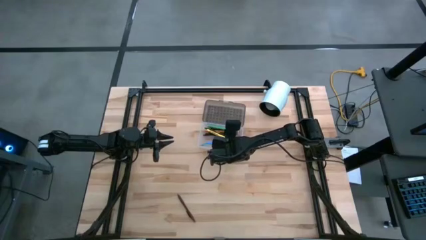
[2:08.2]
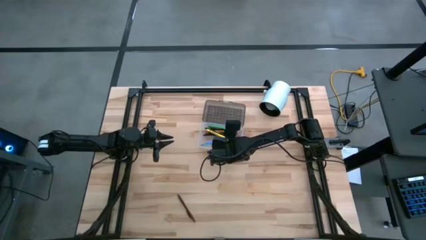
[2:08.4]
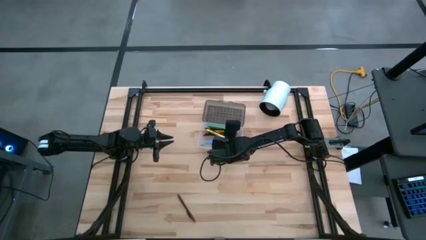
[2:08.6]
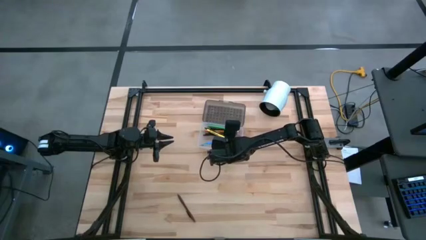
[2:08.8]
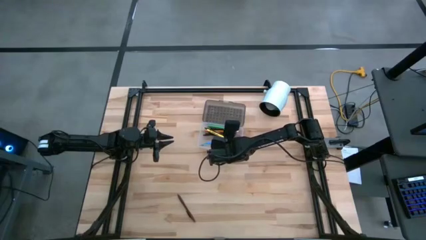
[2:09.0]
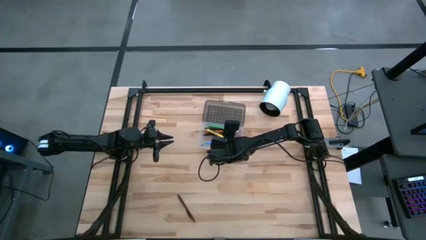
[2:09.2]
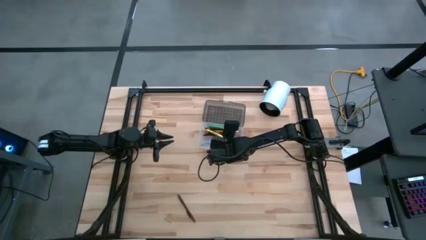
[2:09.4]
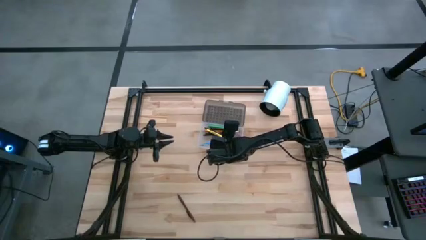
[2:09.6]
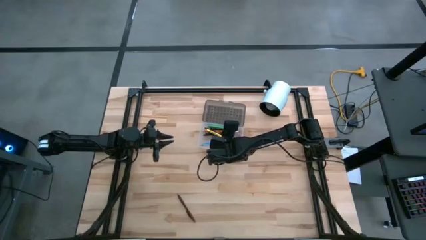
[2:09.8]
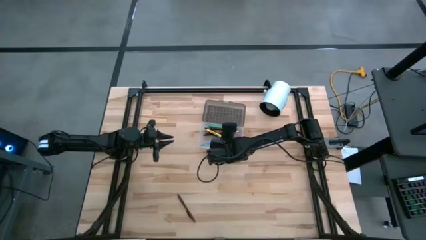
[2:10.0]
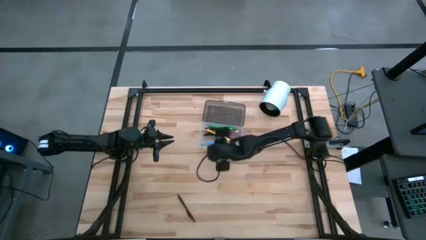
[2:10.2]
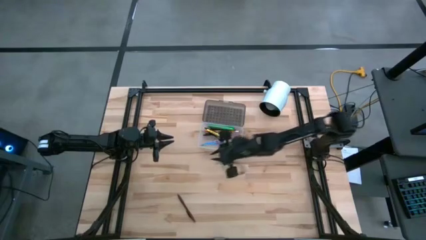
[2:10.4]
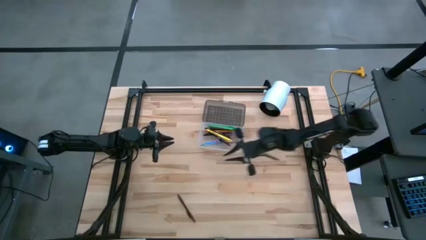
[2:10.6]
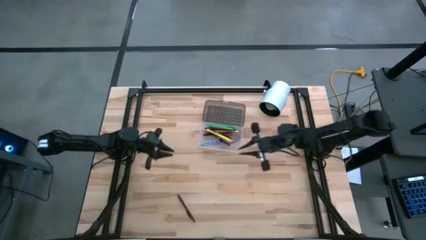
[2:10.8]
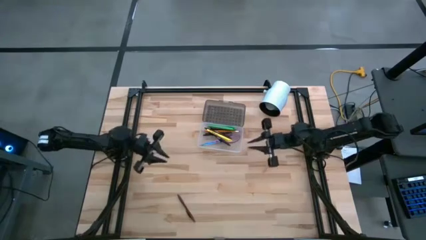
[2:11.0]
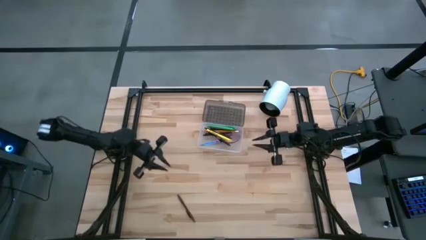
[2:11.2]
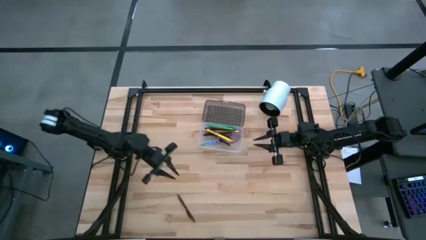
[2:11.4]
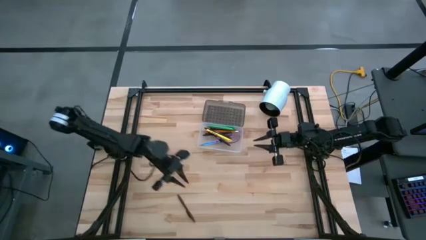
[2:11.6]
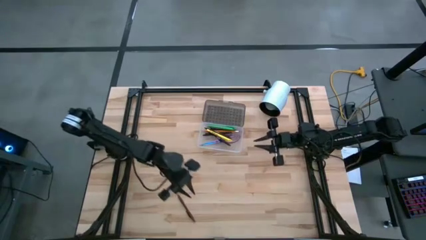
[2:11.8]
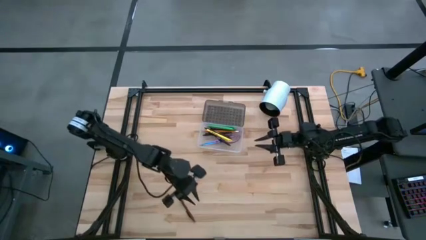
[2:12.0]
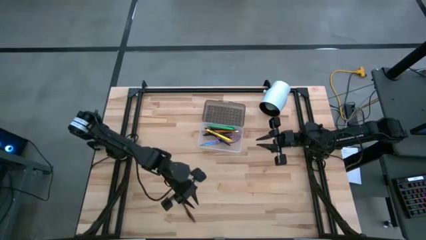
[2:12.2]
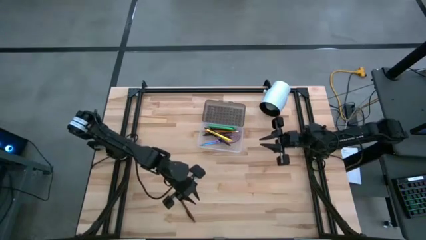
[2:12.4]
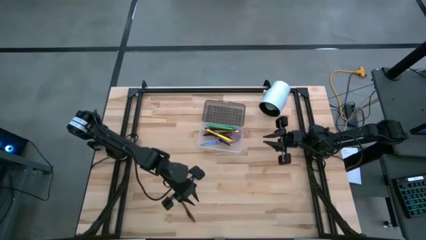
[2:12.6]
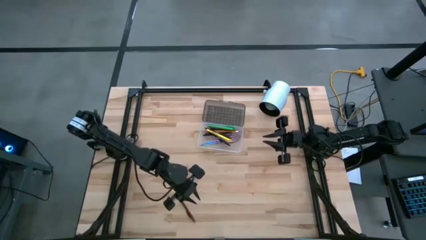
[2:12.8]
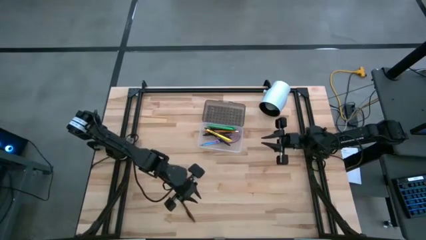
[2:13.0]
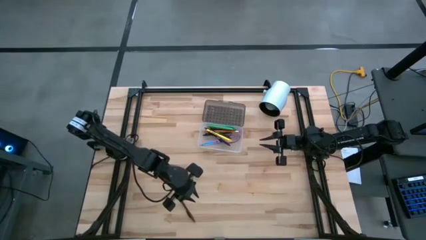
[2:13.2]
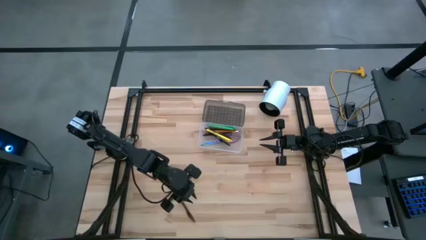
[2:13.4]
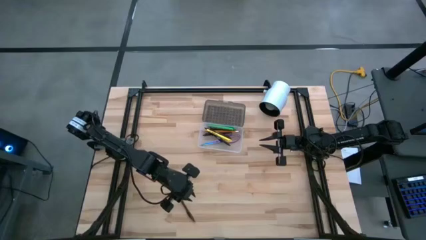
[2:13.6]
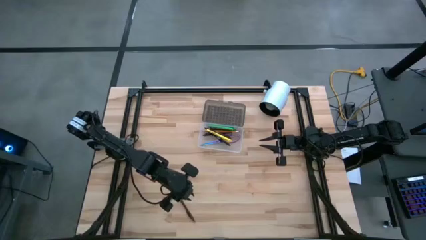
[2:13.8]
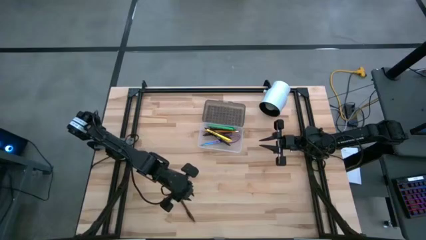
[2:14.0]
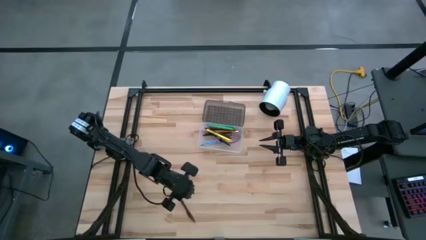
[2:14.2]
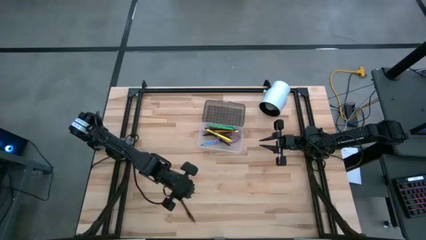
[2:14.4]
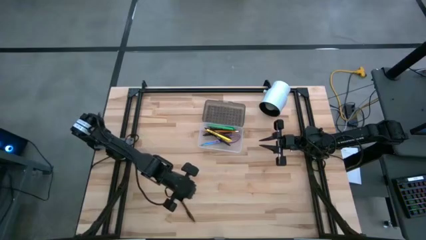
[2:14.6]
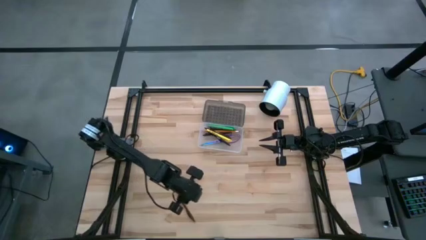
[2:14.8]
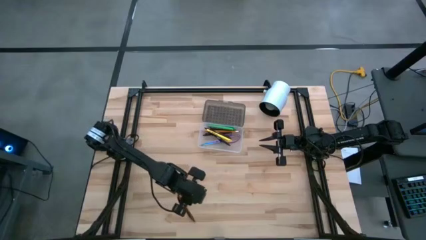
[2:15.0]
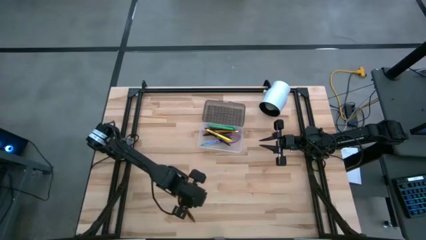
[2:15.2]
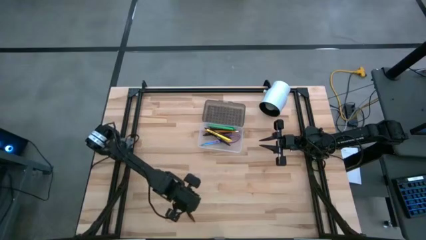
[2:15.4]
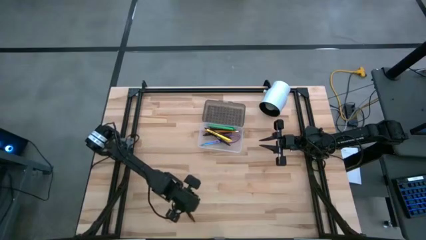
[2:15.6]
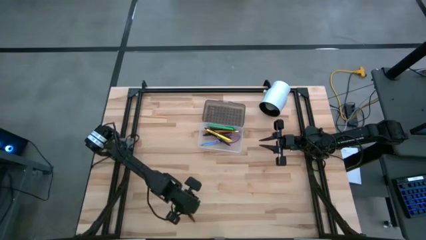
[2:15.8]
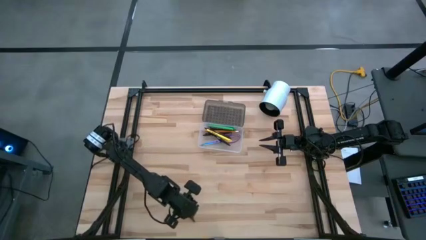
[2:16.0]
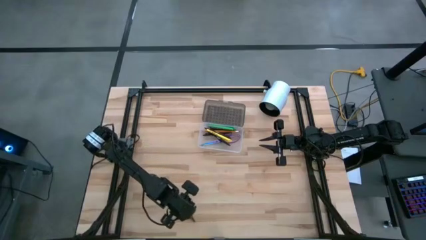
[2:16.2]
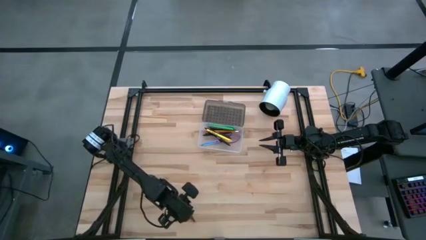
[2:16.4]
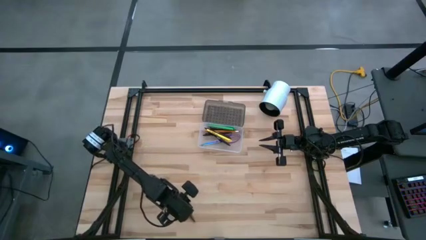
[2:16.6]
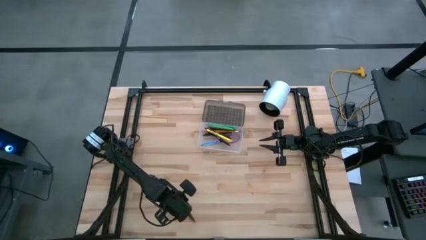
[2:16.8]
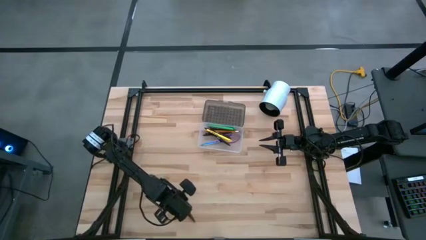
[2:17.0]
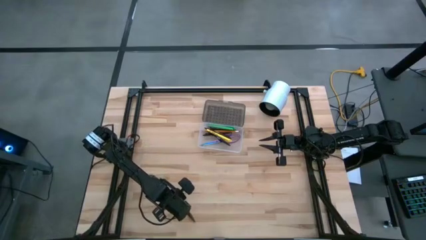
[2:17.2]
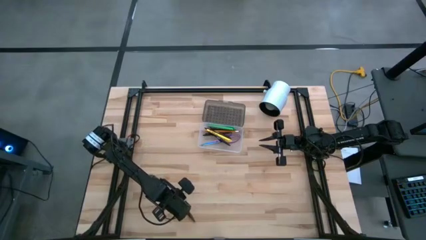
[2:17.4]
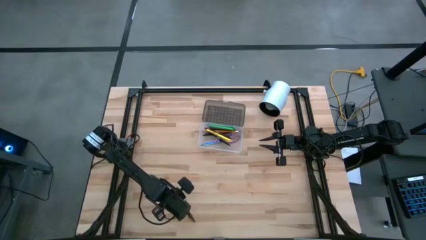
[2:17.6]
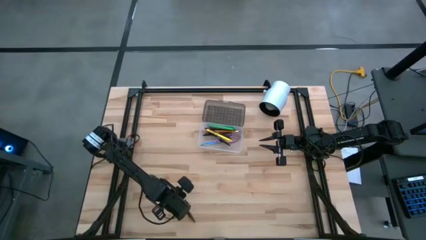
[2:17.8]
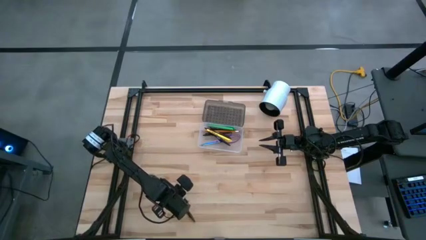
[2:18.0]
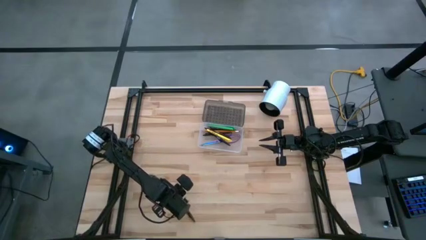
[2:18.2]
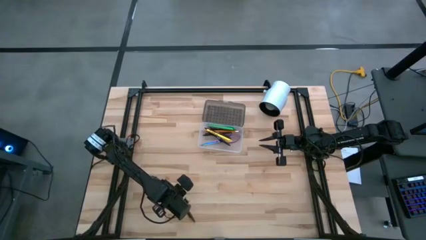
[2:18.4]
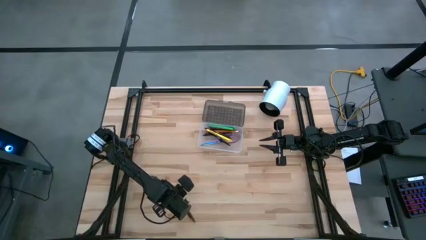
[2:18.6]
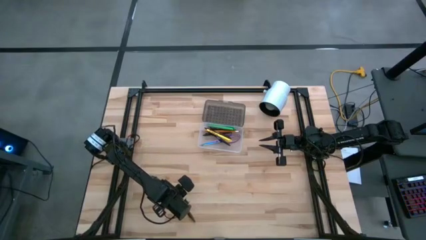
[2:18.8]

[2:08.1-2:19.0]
Task: Pick & place school supplies into a supply box
Put the brown pen into the supply box
